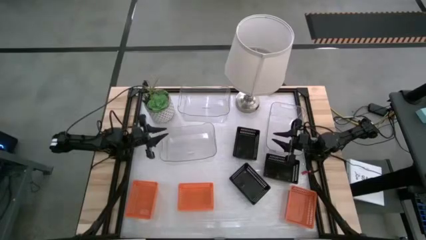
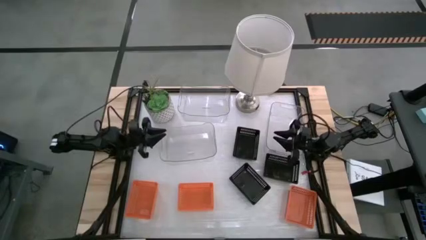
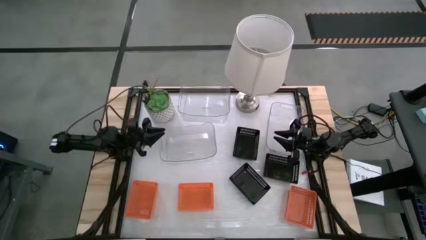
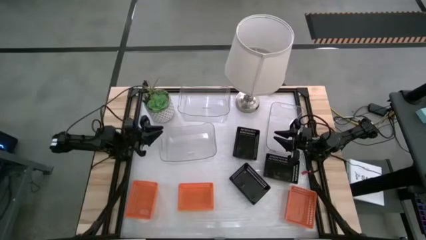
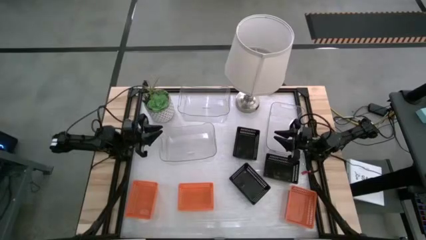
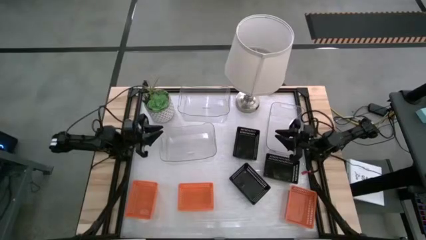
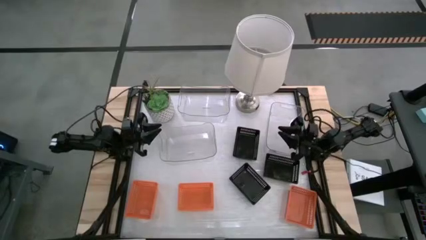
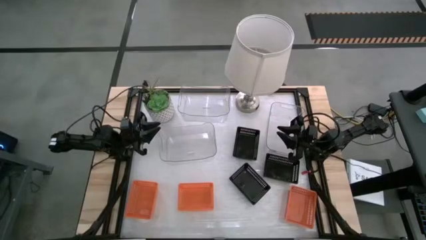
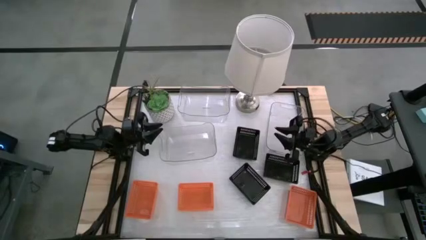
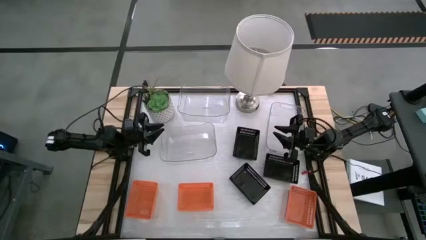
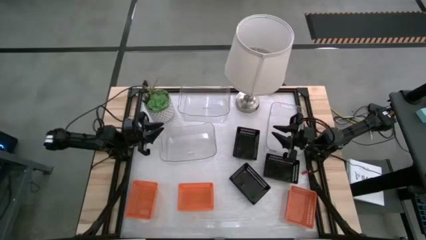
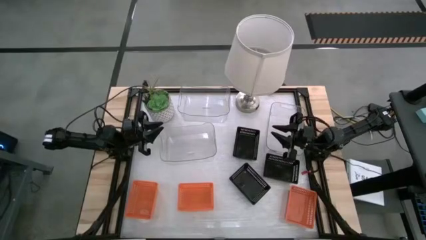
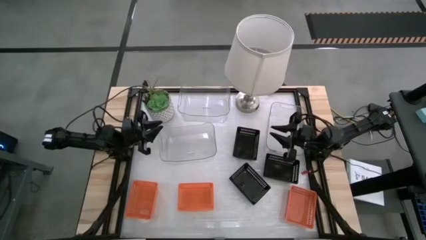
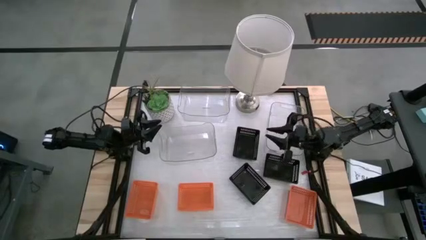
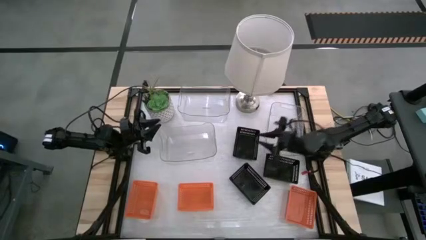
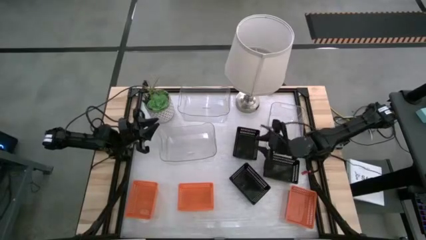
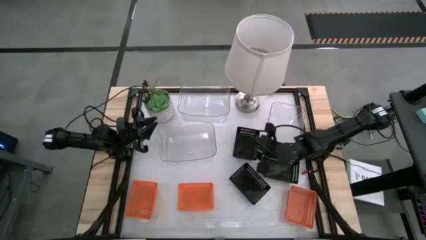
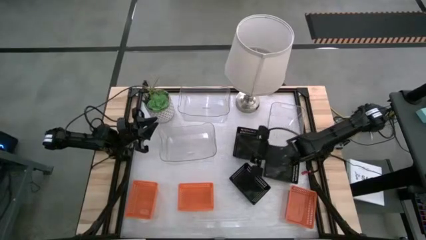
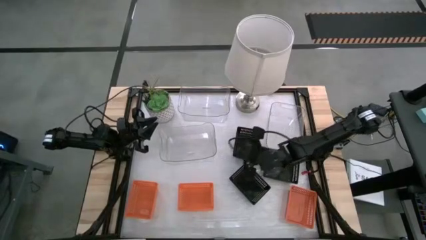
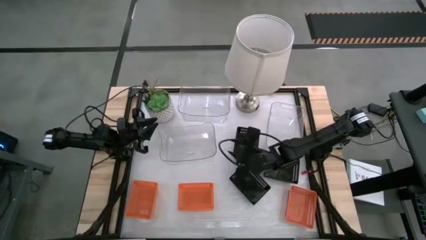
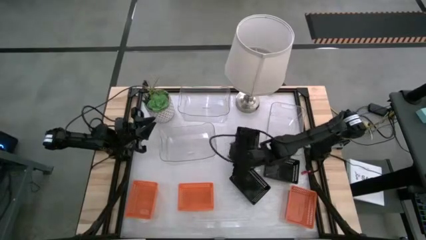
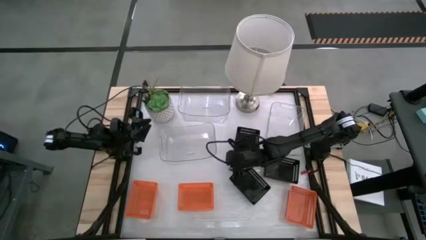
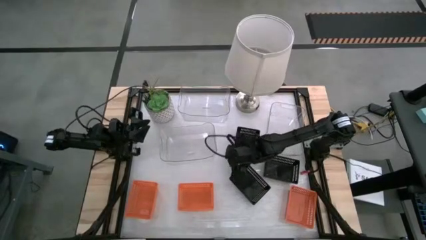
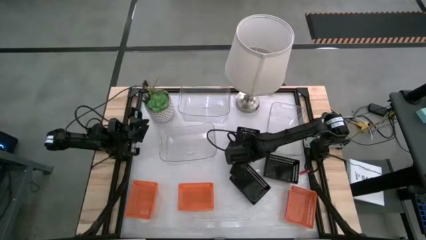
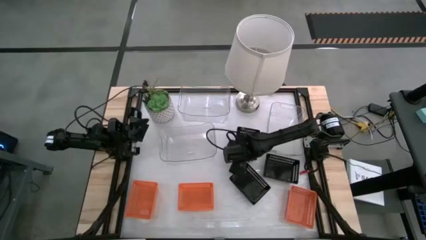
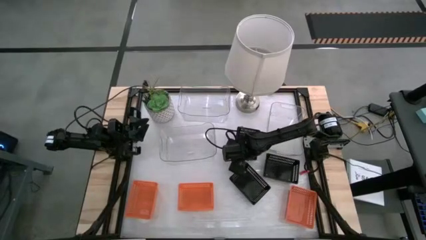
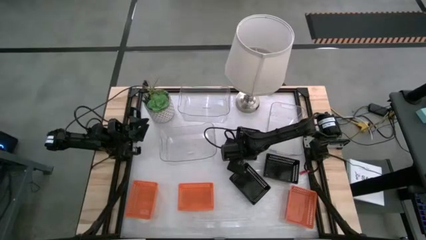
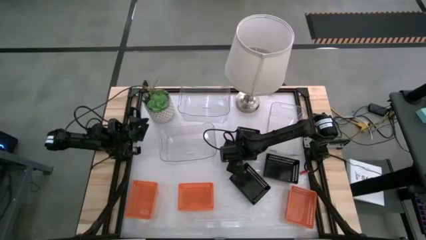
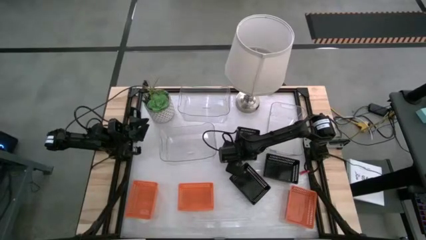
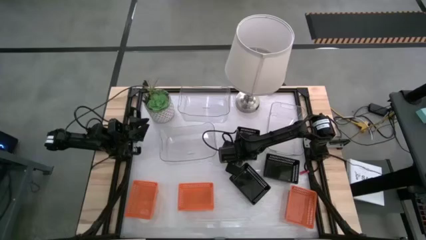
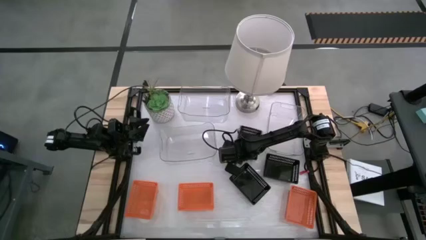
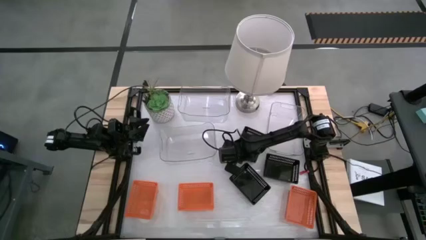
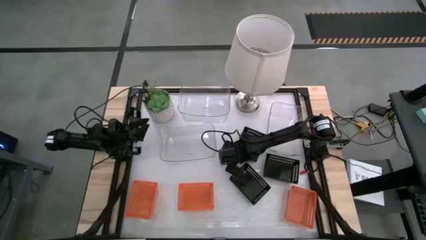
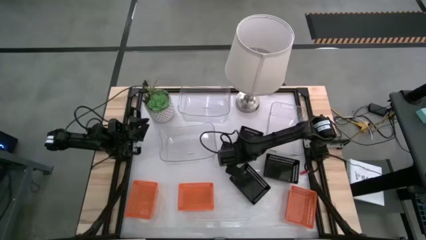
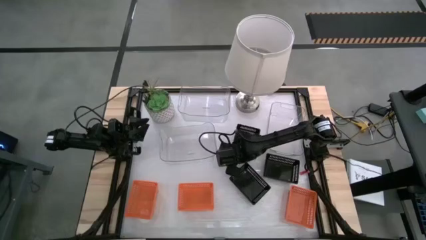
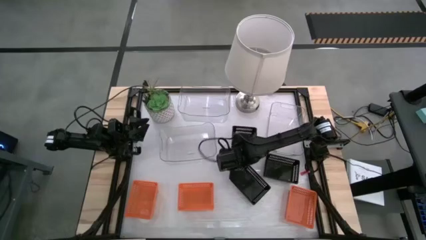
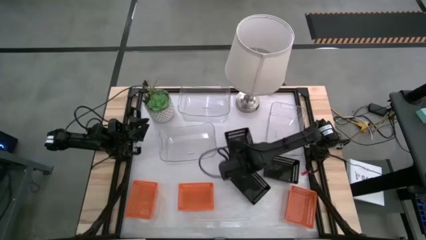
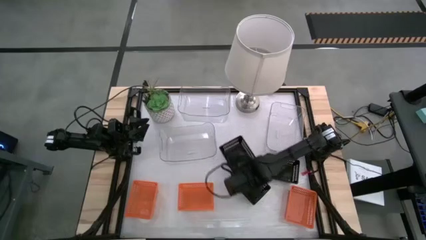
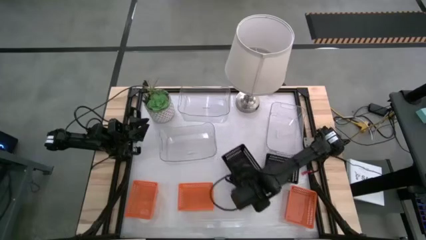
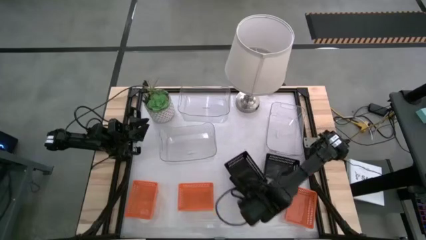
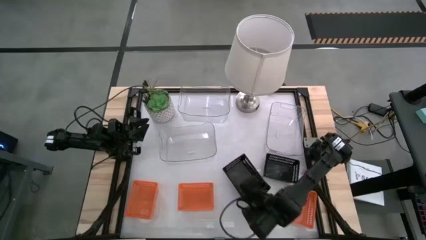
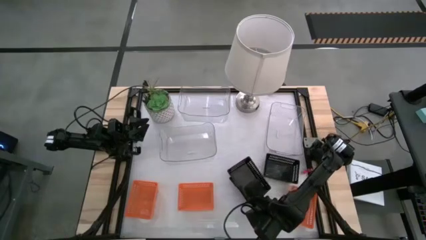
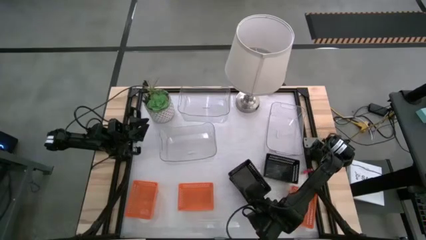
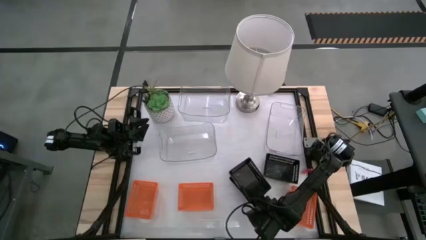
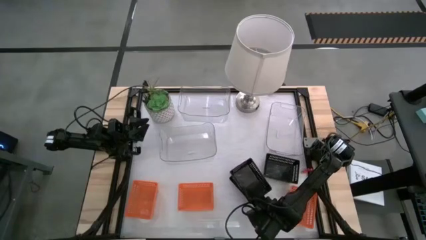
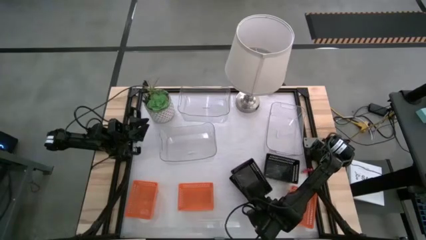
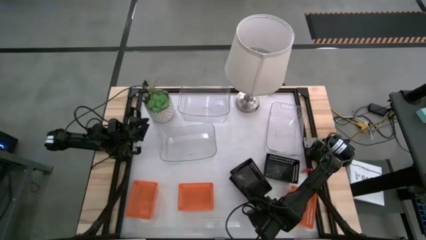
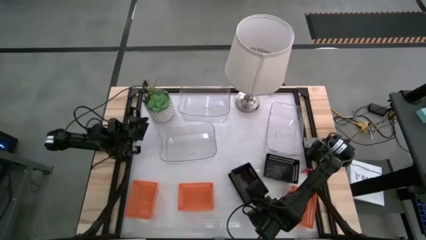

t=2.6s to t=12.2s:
Stack the top black bin on the bottom black bin
